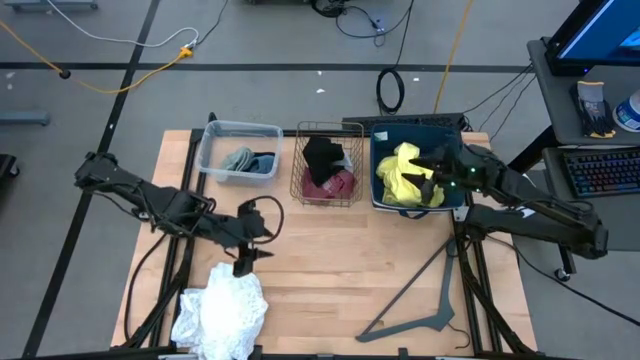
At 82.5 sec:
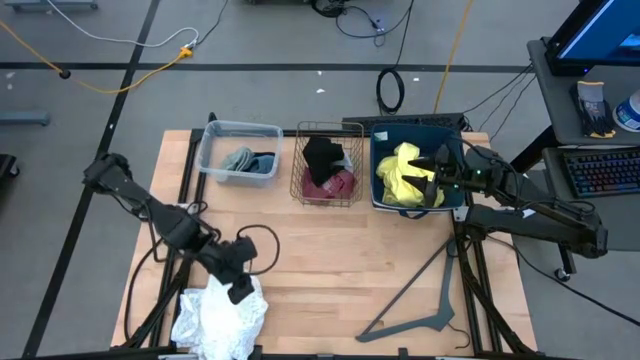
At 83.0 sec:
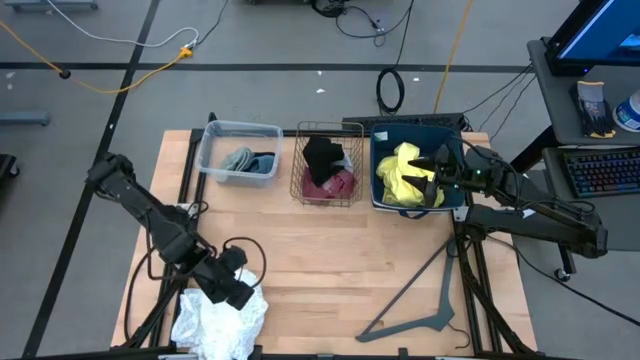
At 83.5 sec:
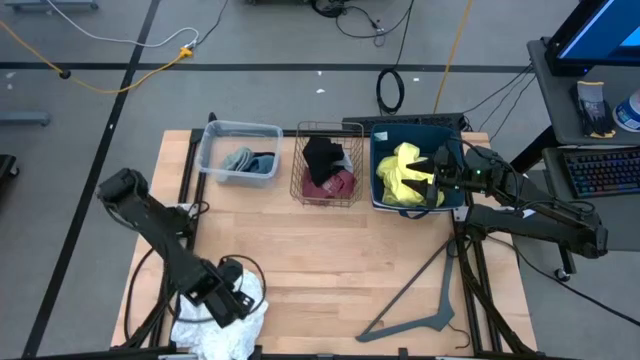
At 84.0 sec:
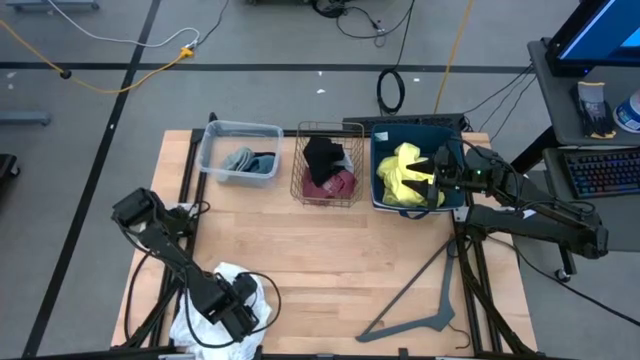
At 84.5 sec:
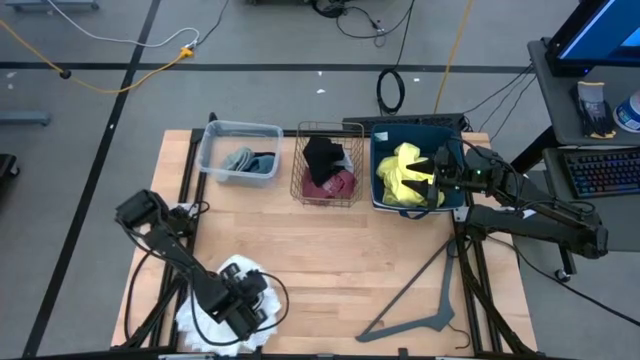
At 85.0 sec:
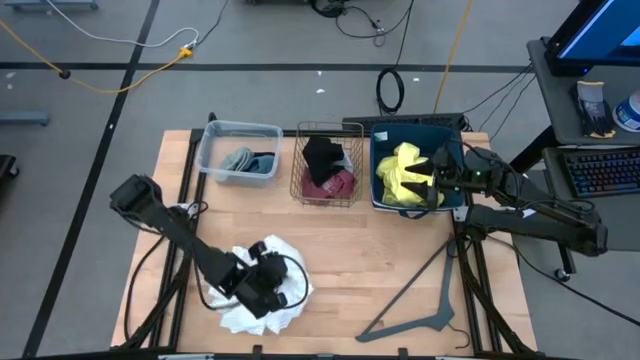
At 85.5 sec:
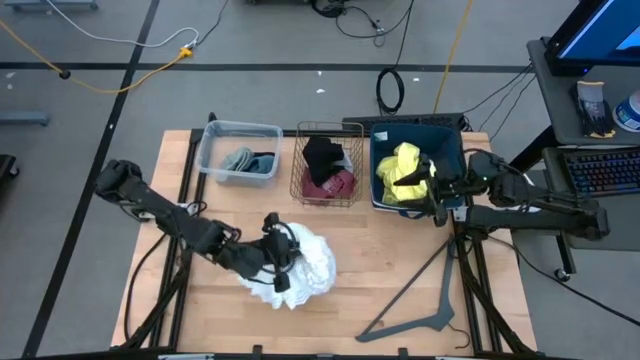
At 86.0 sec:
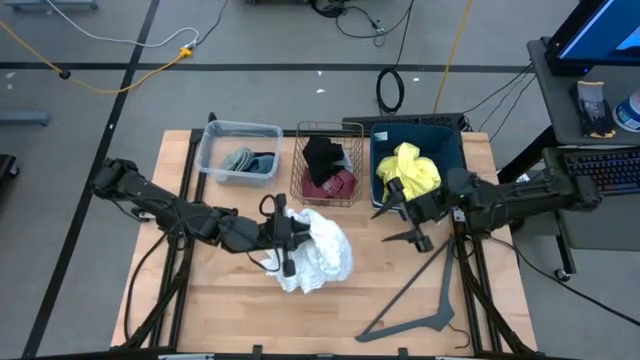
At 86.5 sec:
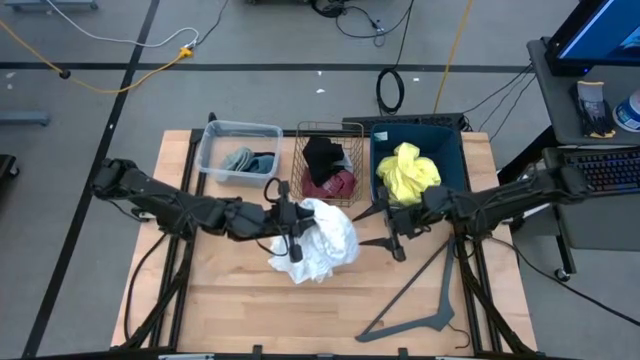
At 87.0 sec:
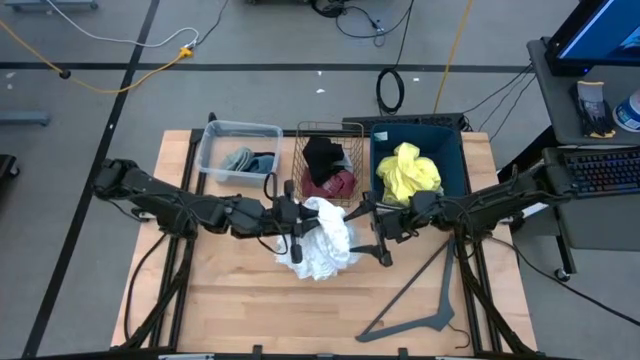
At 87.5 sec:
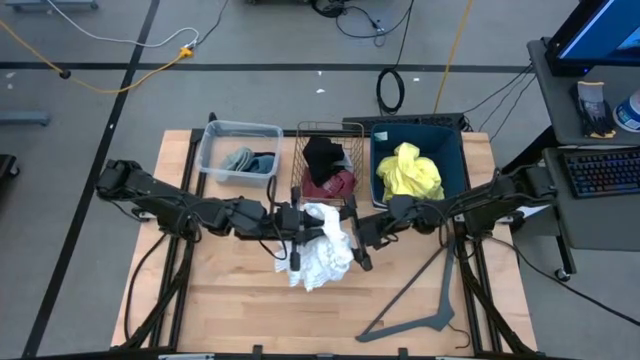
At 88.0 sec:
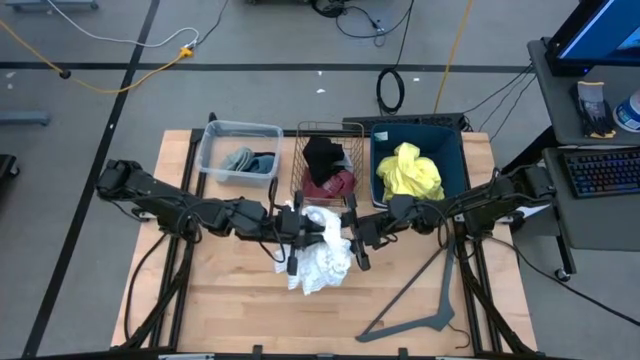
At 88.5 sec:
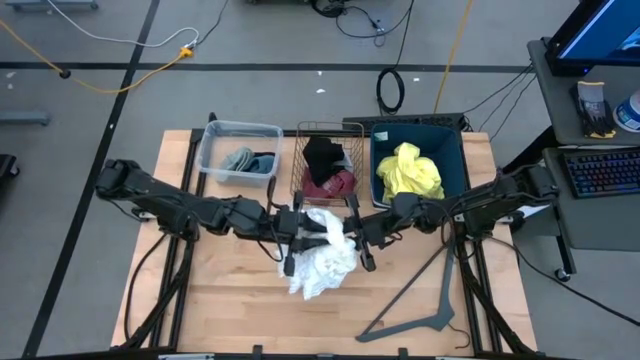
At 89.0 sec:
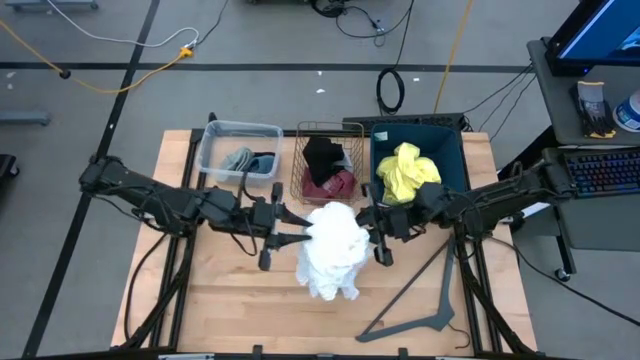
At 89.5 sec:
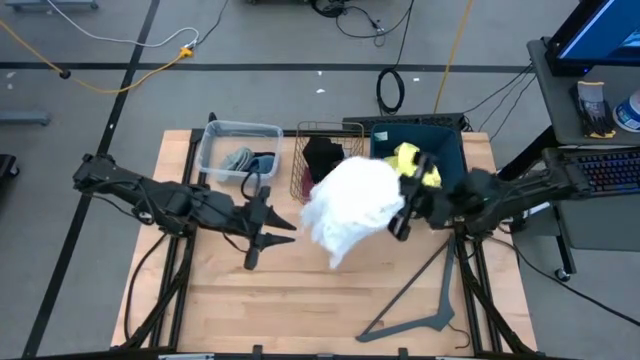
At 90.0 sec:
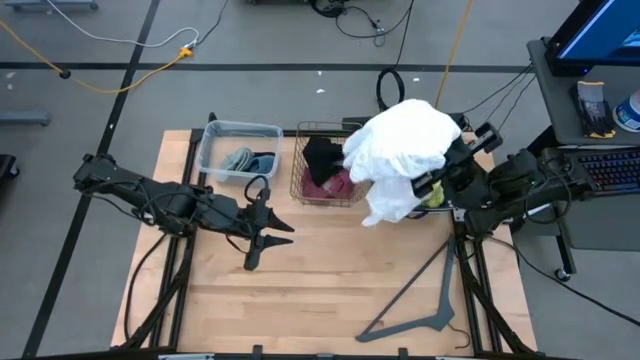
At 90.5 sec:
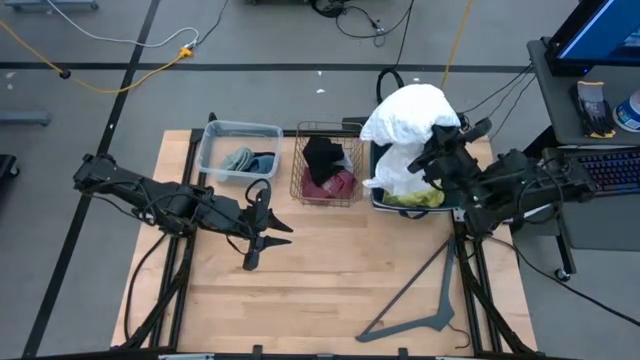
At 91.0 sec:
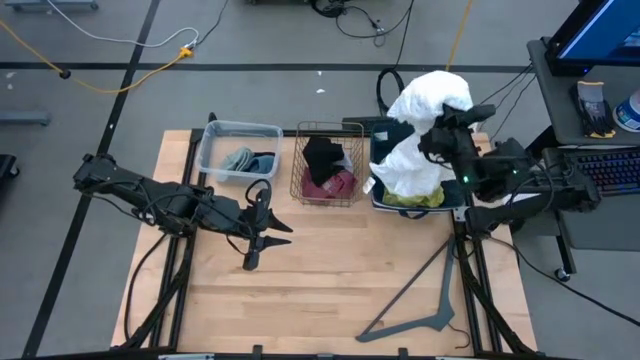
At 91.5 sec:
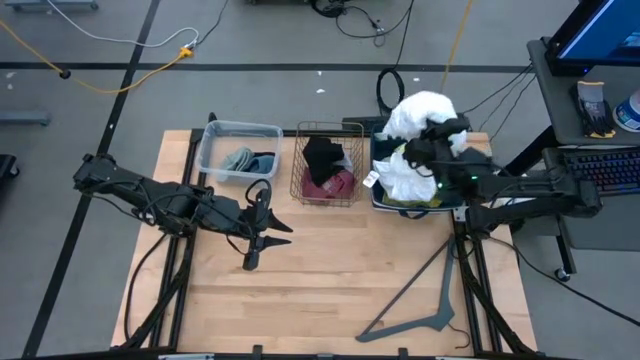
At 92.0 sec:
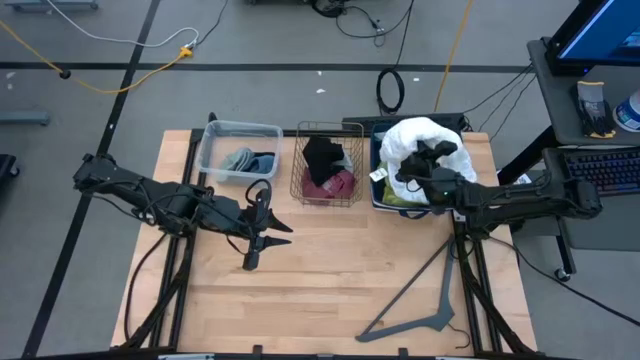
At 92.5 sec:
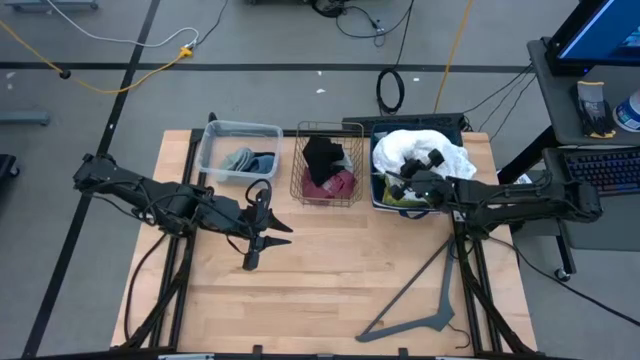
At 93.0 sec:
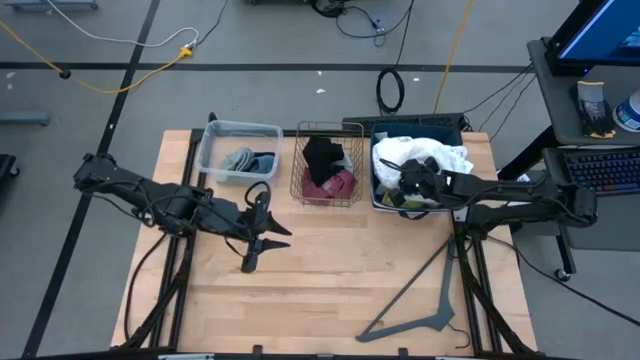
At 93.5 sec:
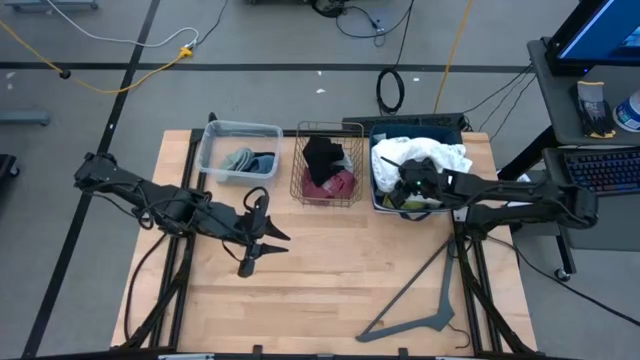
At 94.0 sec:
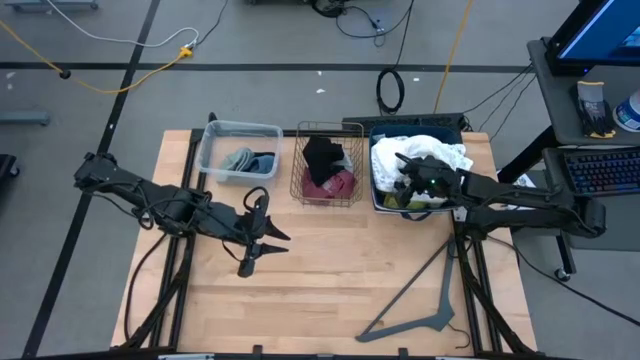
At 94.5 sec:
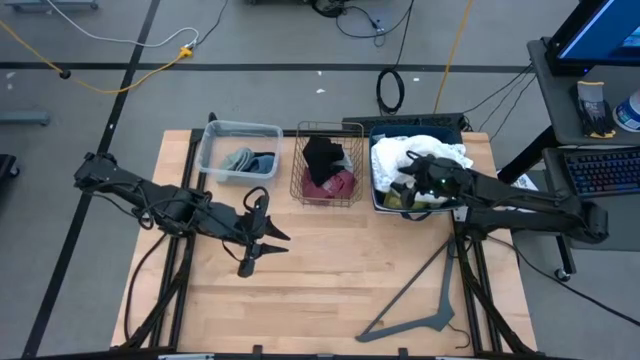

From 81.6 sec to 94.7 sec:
Task: Pick & Place Cloths
Put the white dress into the laundry bin

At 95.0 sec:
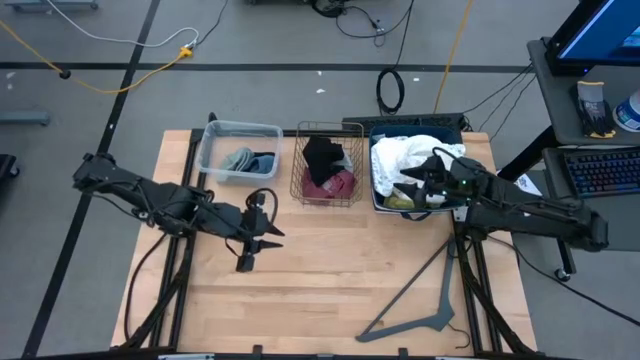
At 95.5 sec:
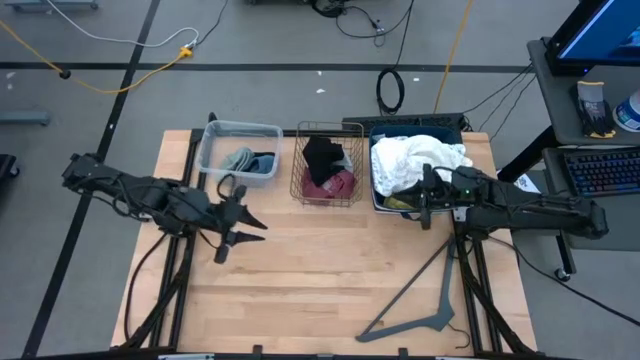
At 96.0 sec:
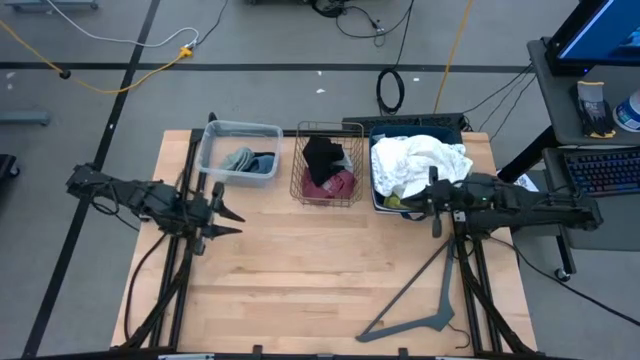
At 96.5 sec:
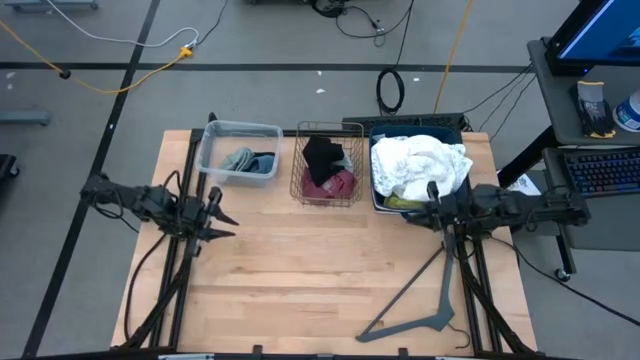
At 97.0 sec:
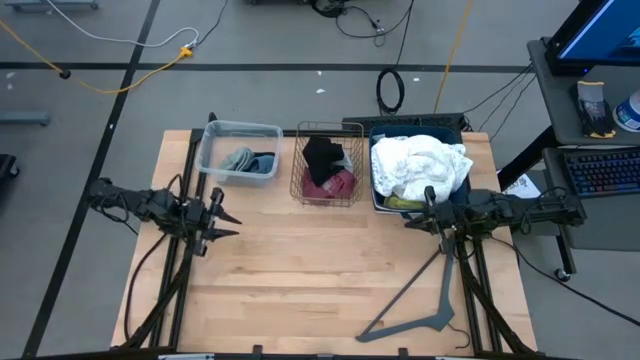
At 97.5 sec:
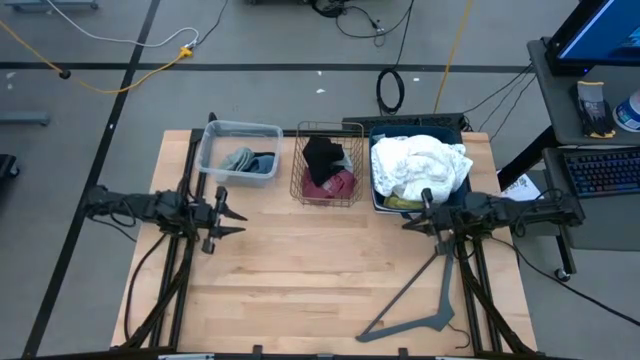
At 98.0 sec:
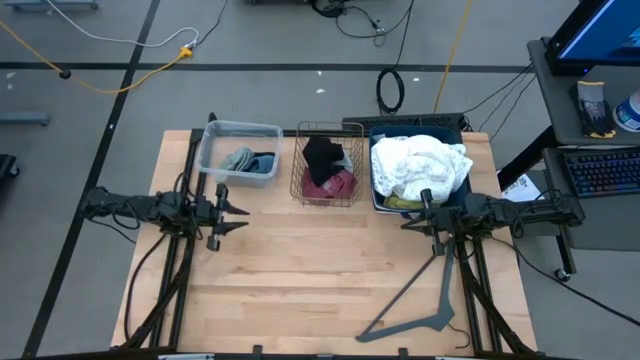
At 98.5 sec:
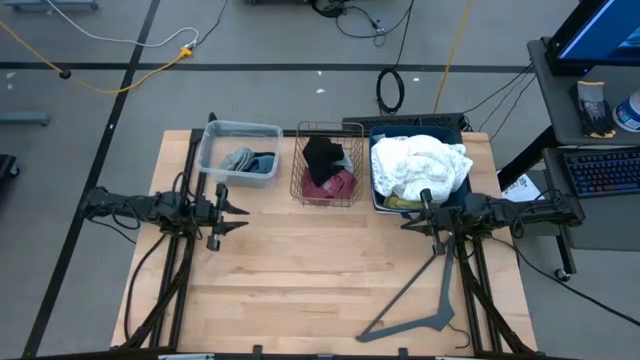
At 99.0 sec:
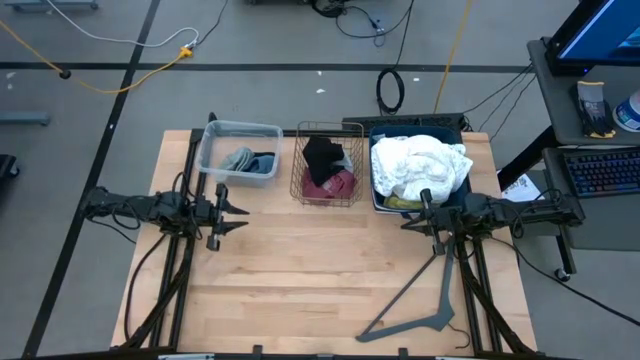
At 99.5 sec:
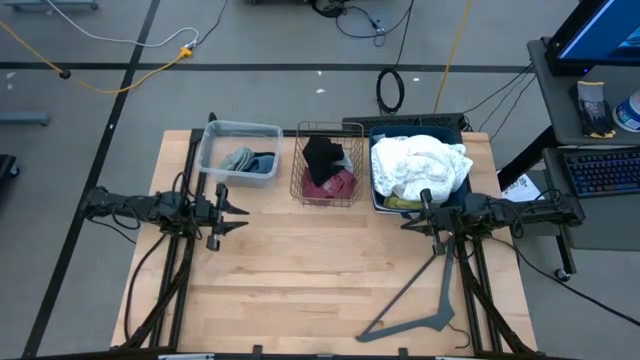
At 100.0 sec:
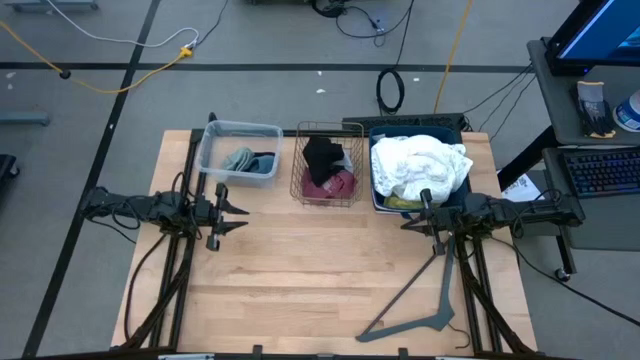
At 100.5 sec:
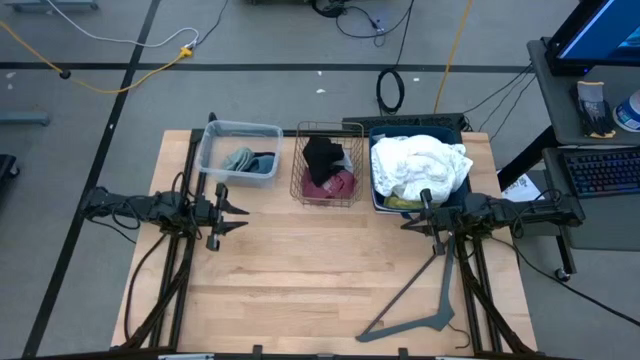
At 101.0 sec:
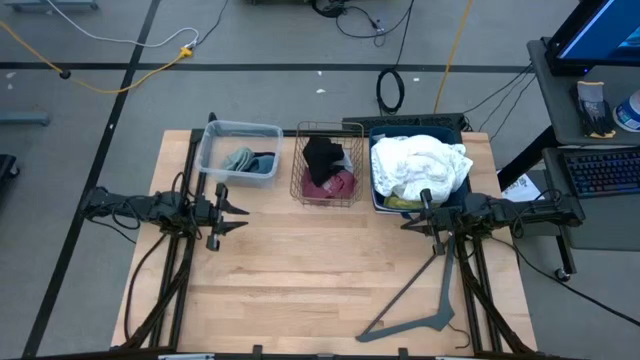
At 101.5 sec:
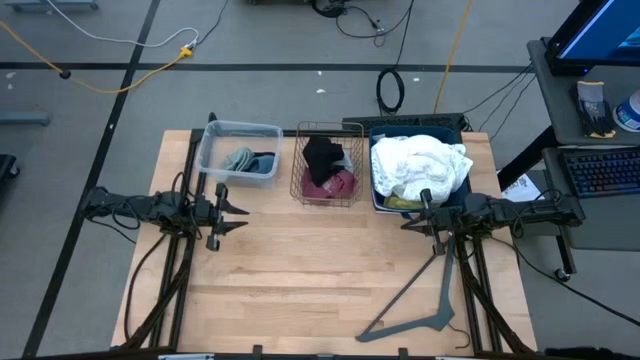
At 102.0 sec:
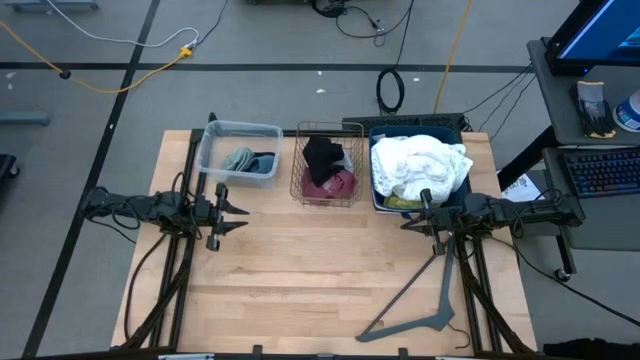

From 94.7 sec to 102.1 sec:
Return to Home Position

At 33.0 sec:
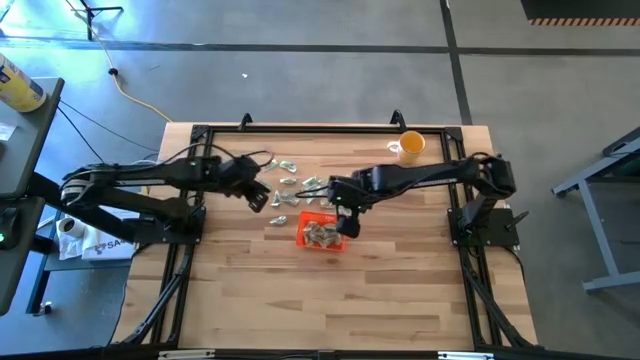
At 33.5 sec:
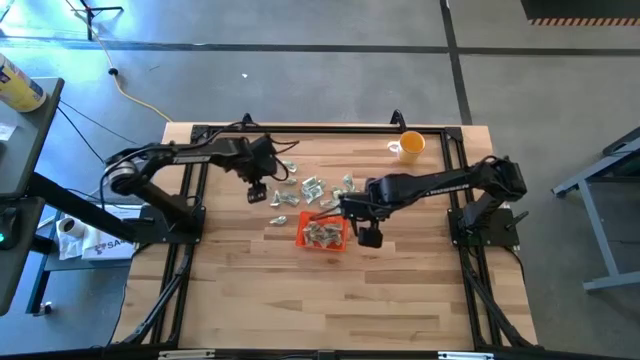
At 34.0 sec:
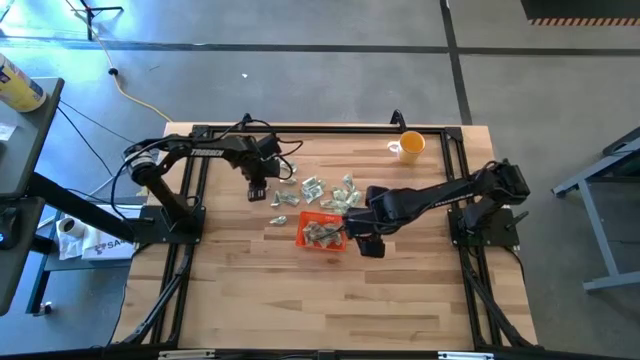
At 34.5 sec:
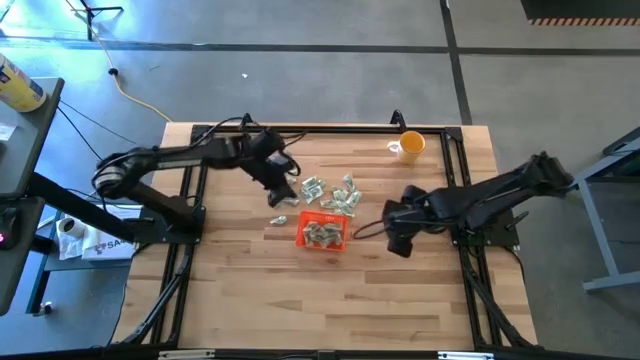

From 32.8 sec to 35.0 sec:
Task: Pick and place Stevia / Truvia into bins
Put the stevia packet into the orange bin
